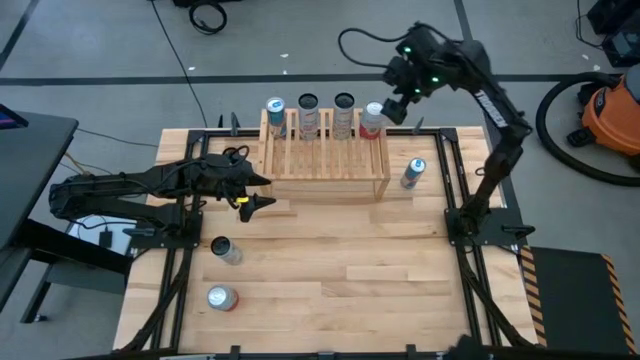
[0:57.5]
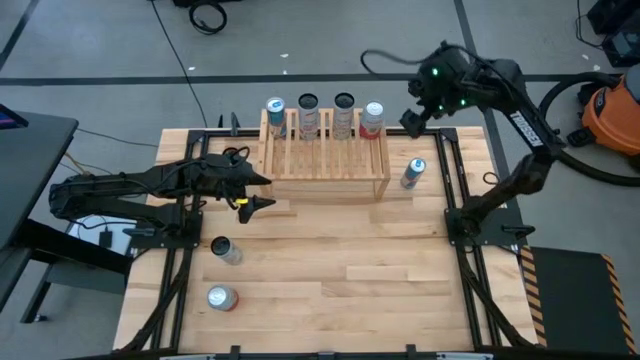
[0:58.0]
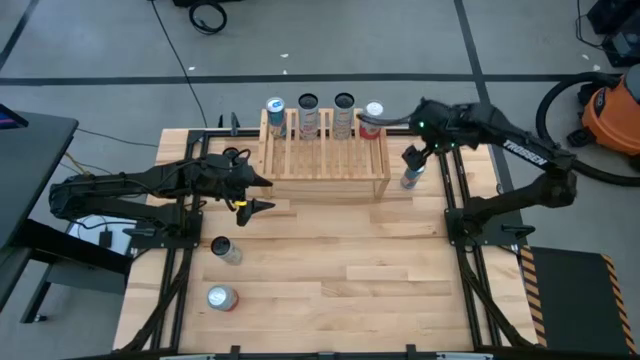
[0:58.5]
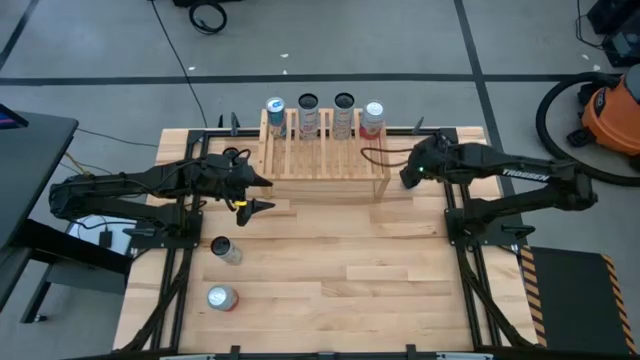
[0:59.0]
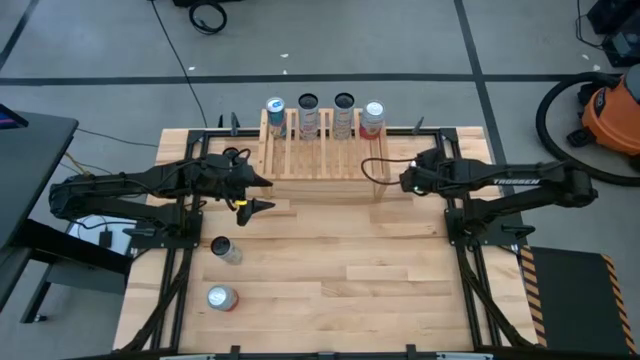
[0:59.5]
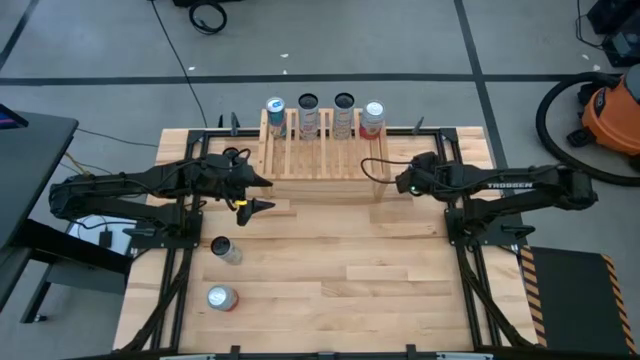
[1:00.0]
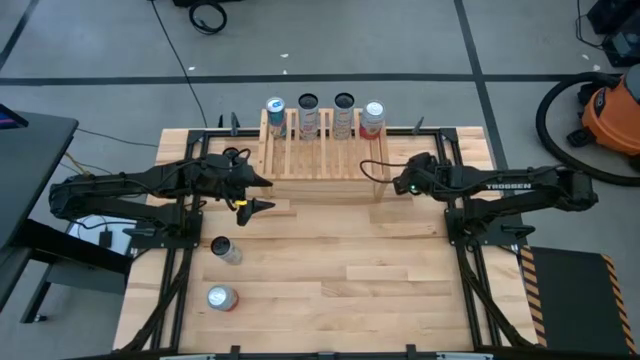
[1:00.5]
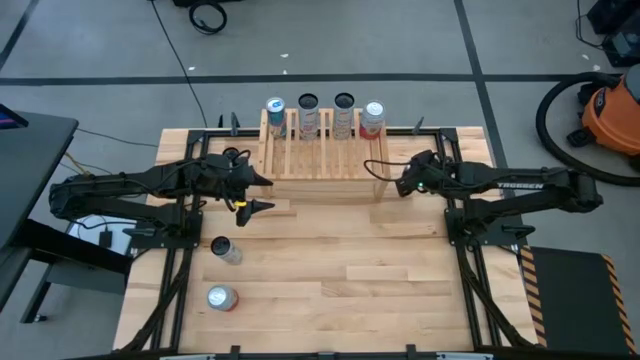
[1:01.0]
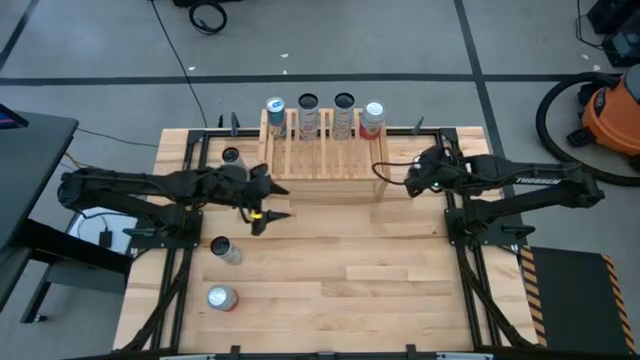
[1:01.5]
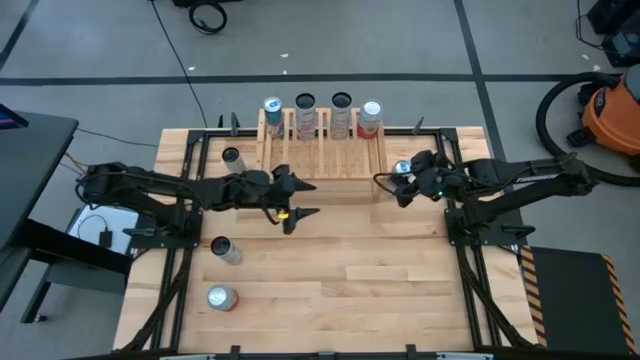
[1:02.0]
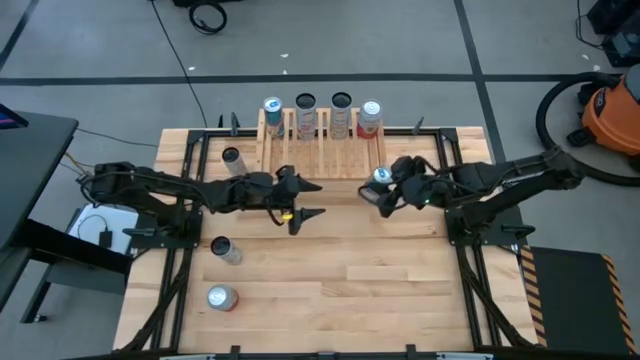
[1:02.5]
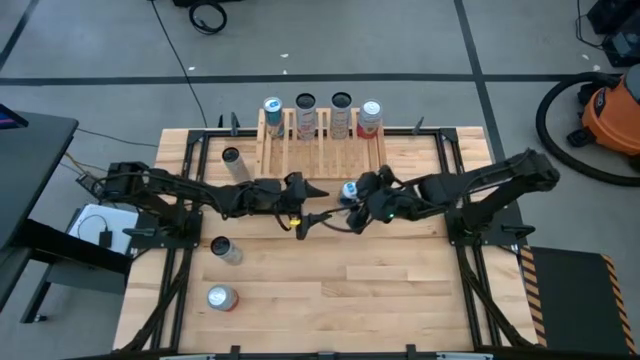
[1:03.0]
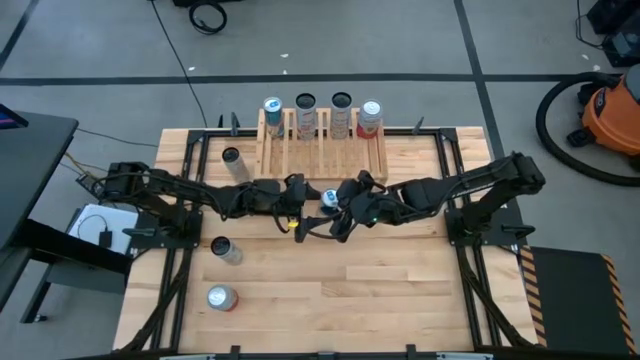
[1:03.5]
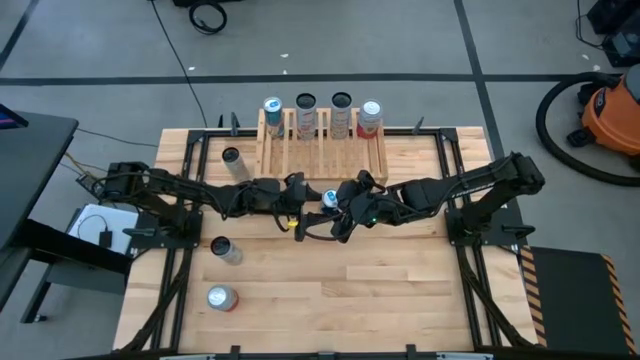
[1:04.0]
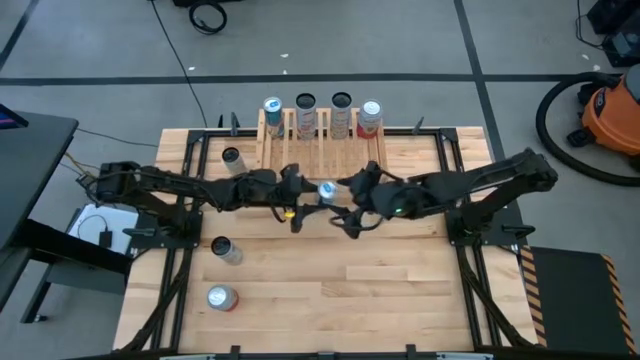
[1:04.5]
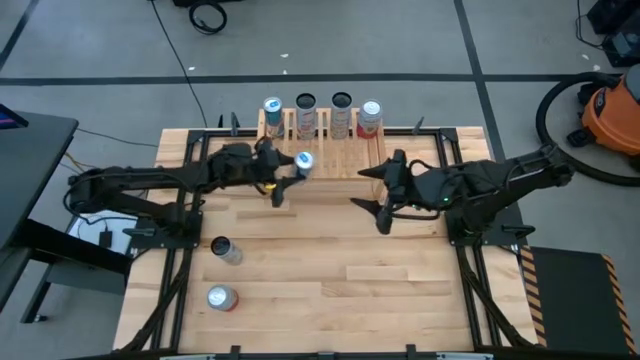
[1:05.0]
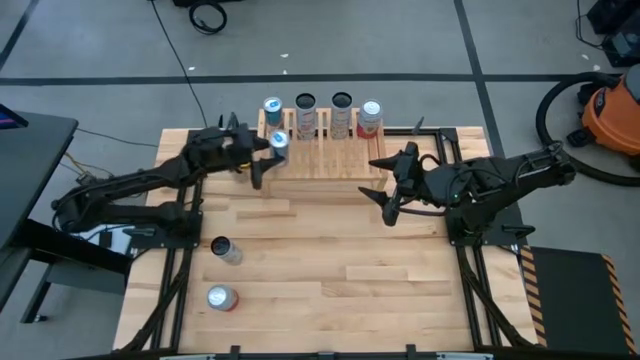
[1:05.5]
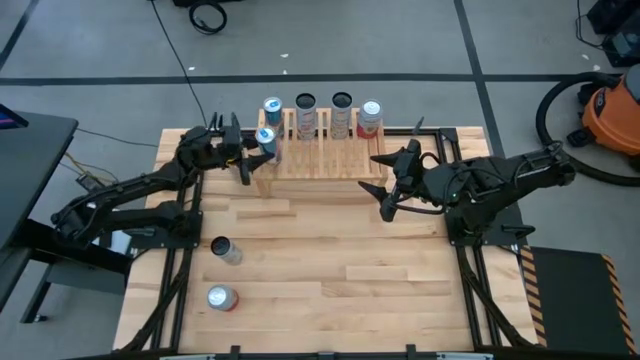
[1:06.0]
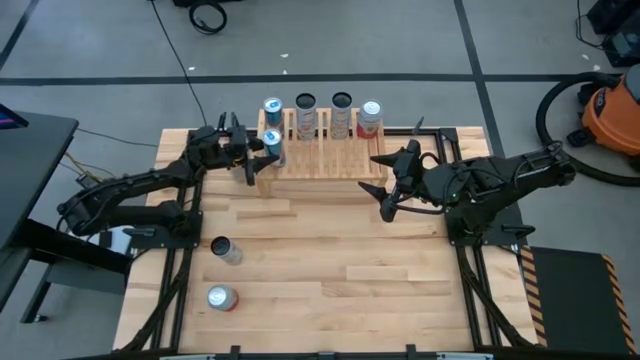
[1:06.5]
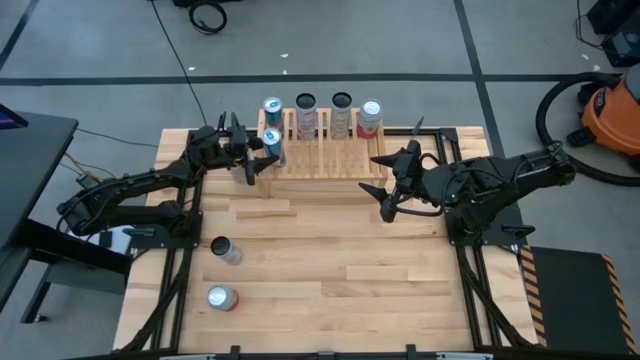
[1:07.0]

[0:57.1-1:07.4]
Task: Place canned beverage on shelf
Put the blue soda can on the shelf aligned with the other blue soda can

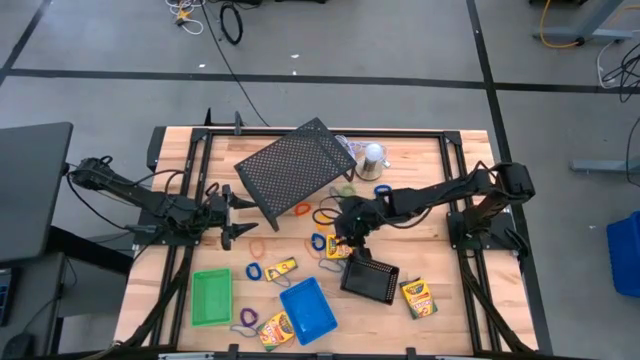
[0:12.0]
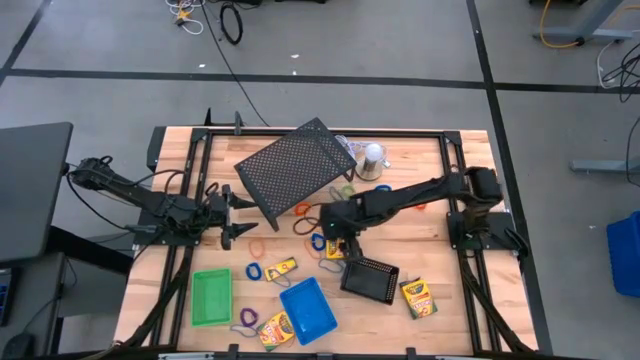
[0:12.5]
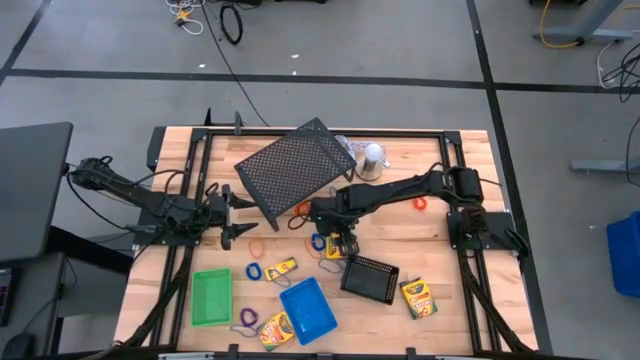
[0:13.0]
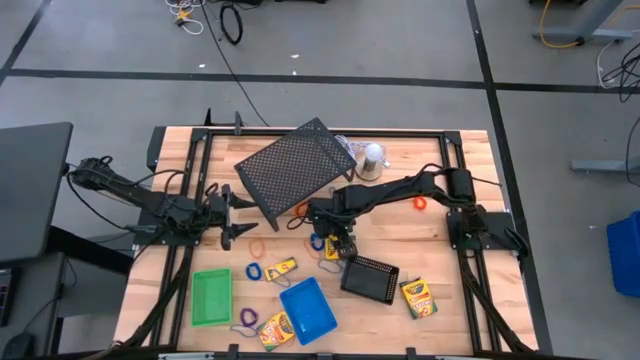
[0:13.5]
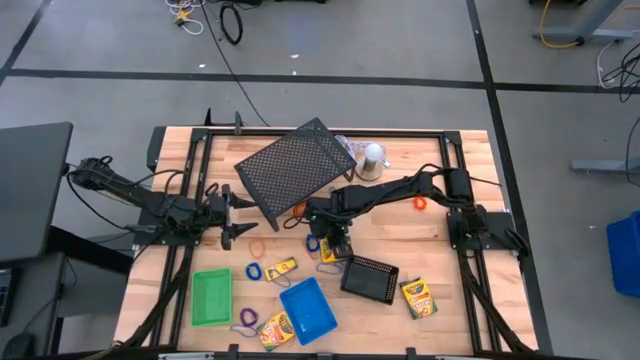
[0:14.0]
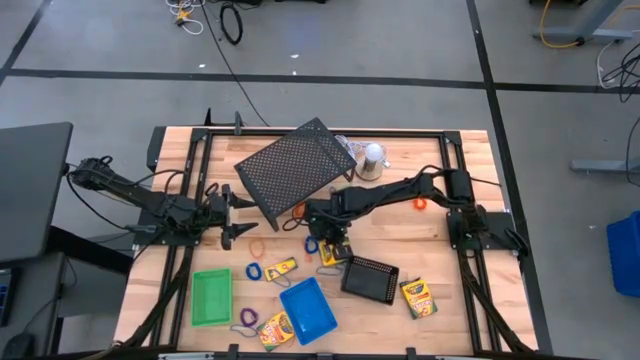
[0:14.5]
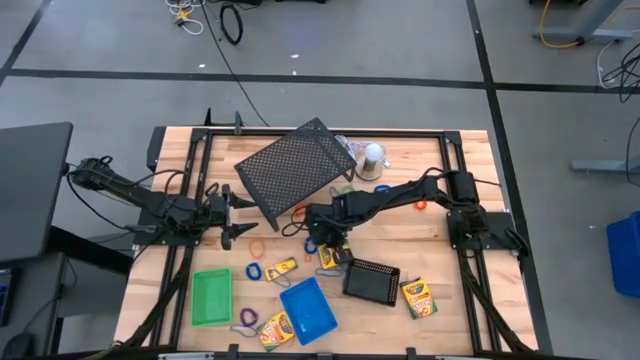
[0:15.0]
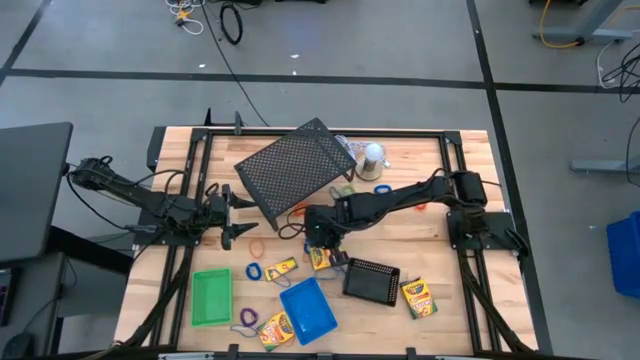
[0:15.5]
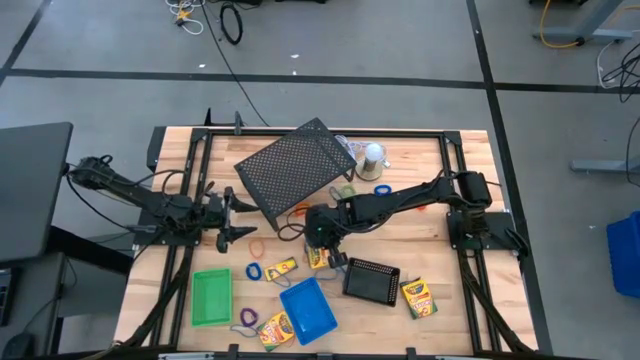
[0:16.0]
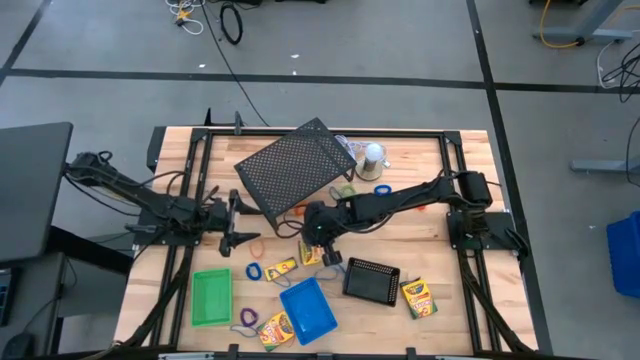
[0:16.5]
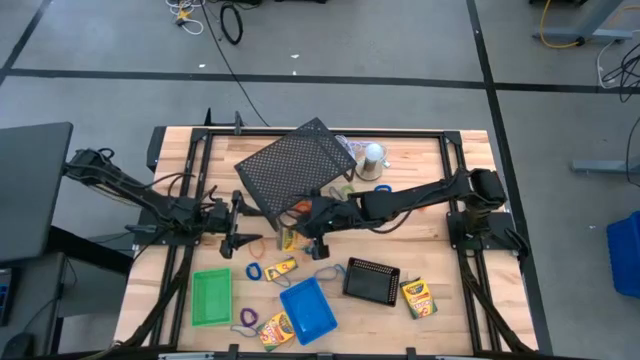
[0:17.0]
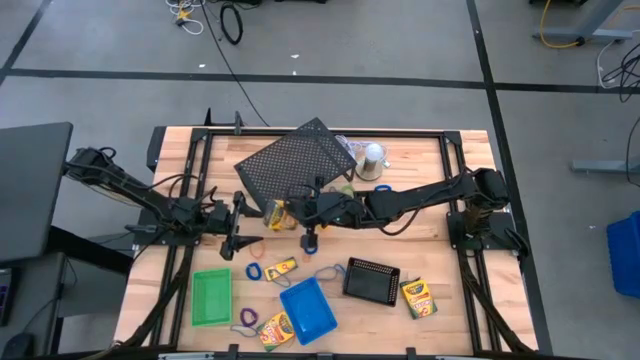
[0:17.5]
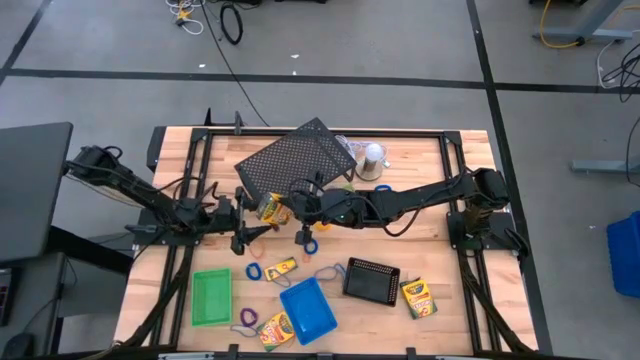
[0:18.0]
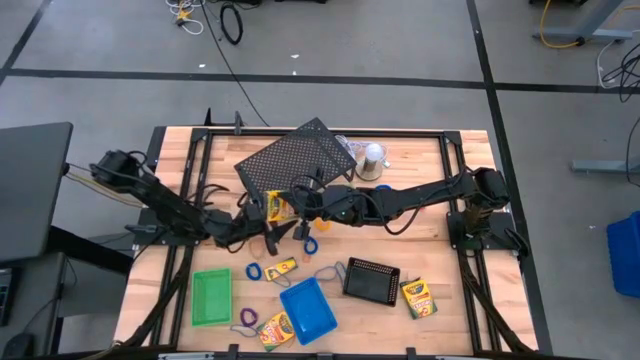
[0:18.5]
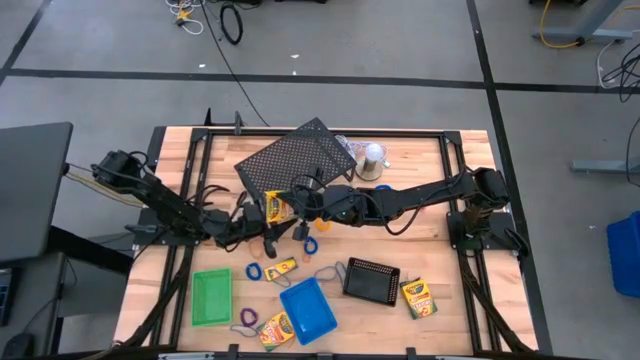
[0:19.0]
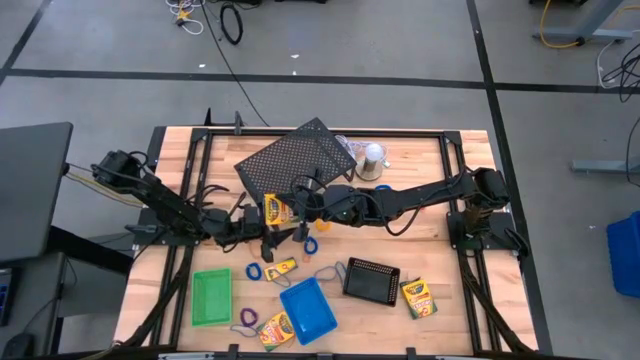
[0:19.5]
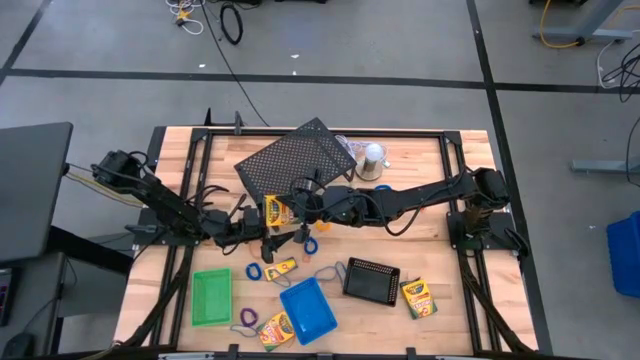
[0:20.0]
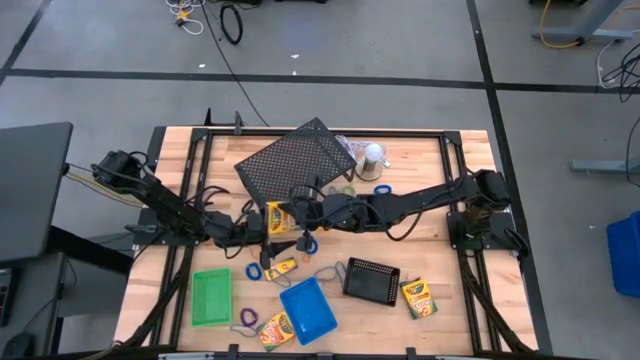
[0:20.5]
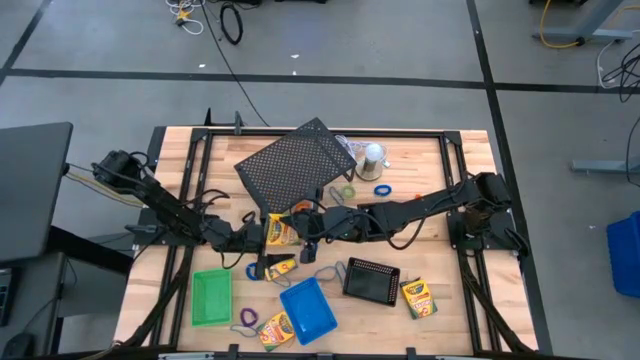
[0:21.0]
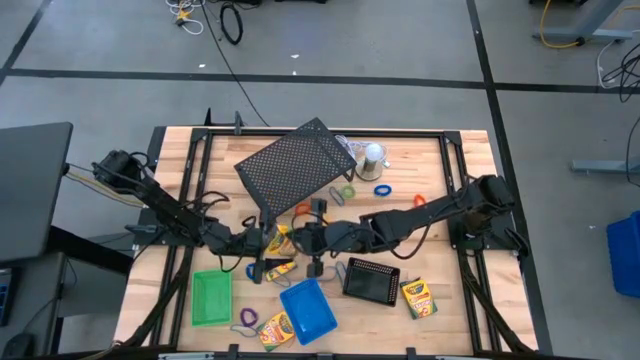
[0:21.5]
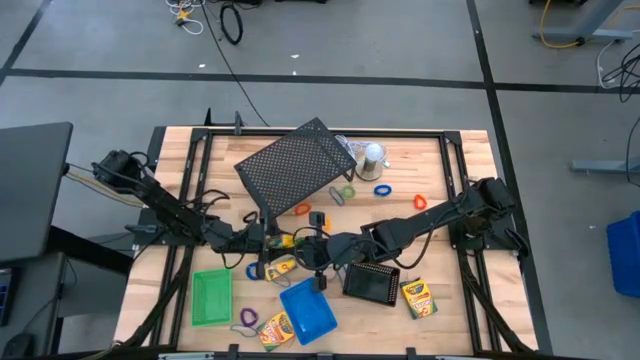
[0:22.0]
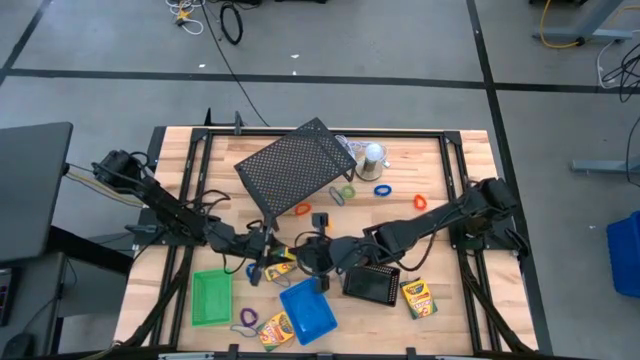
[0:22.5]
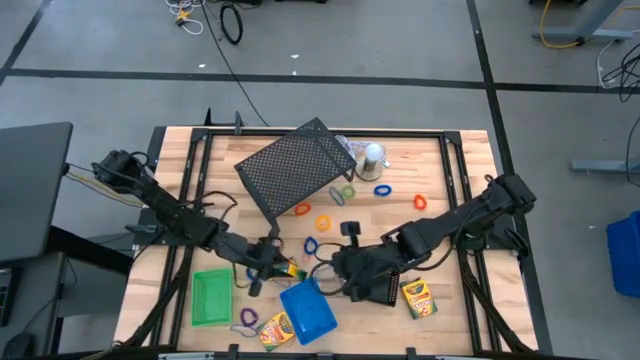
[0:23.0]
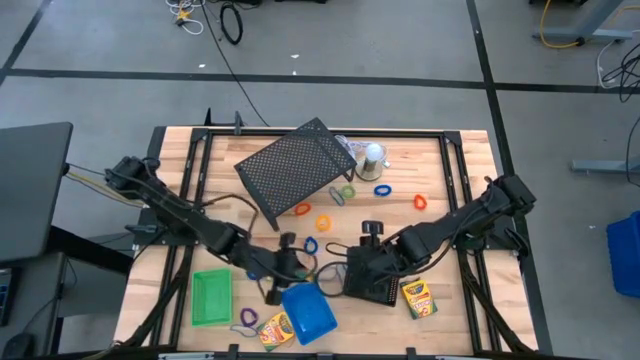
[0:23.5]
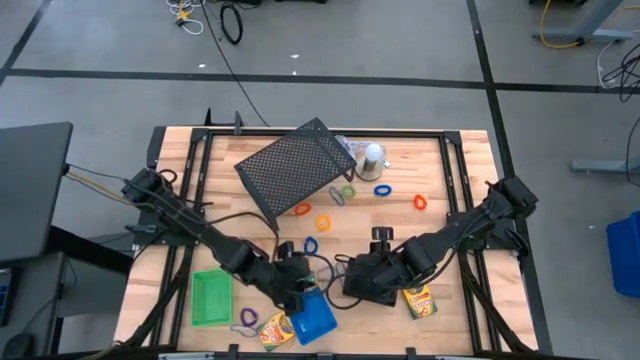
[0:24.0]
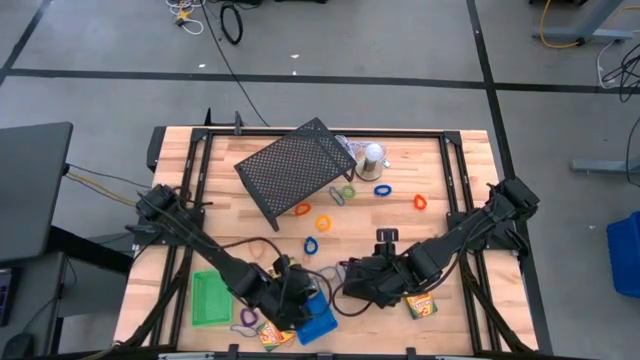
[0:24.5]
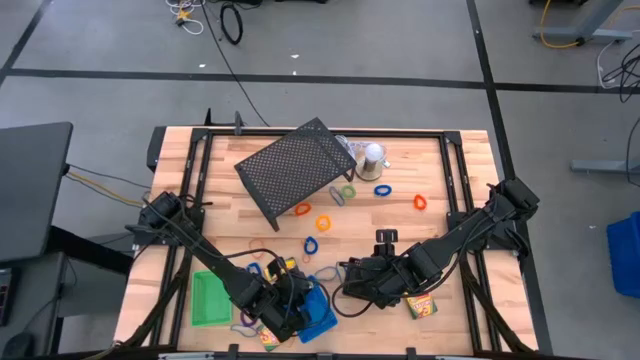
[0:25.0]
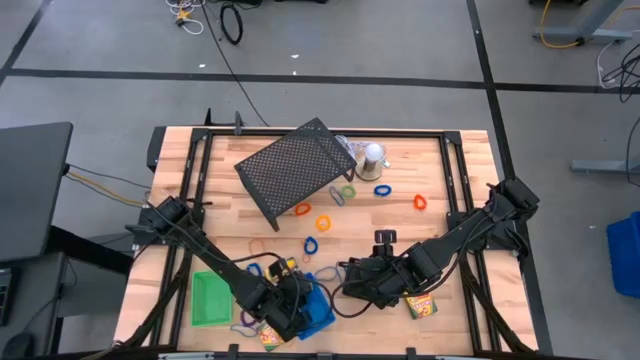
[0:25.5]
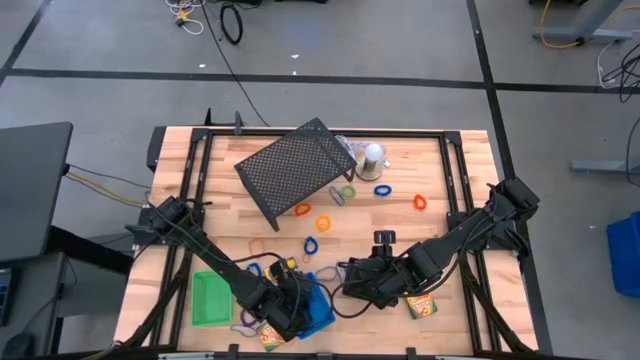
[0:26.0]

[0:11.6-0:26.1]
Task: Pick & Place Office Desk Supplies
Put the yellow crayon box into the blue bin
